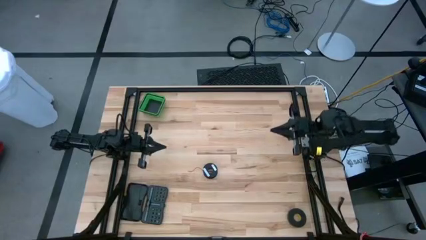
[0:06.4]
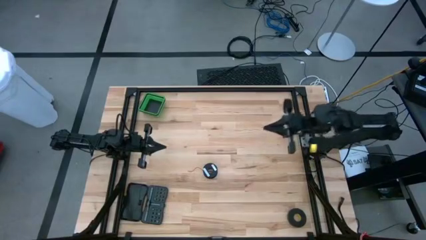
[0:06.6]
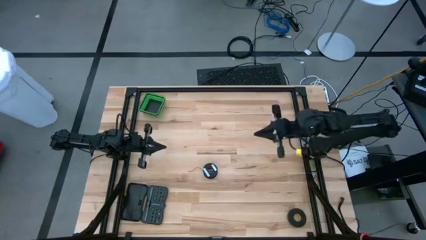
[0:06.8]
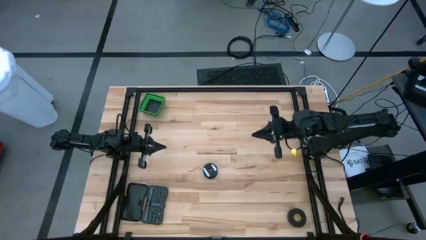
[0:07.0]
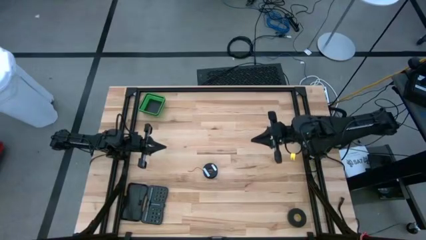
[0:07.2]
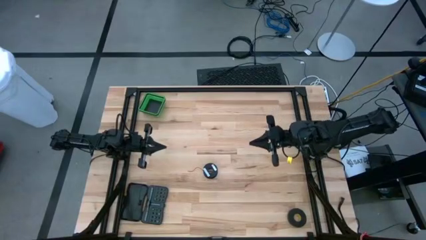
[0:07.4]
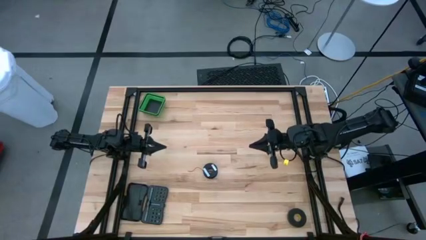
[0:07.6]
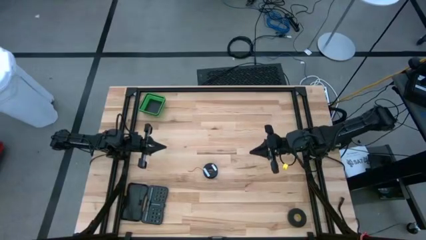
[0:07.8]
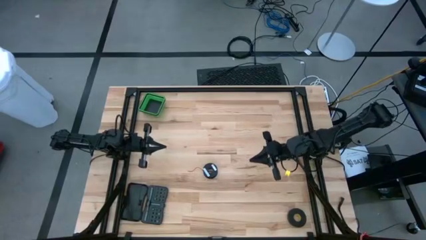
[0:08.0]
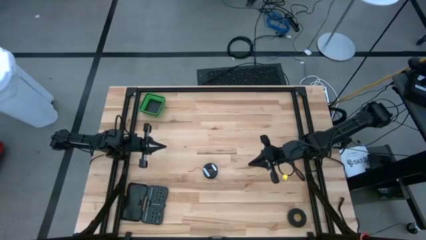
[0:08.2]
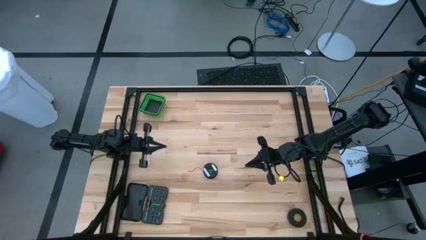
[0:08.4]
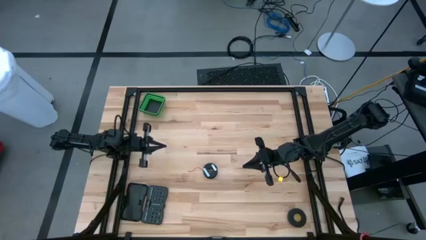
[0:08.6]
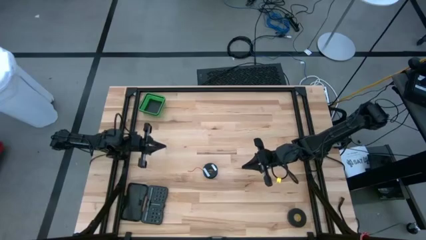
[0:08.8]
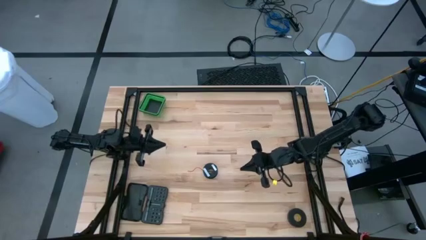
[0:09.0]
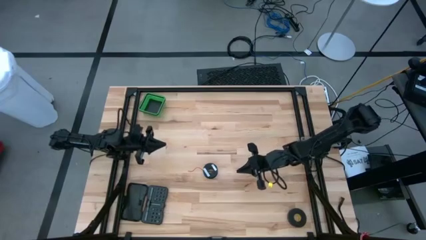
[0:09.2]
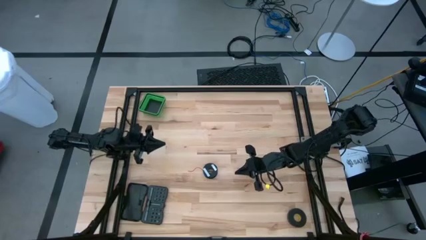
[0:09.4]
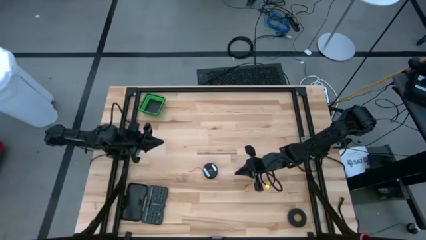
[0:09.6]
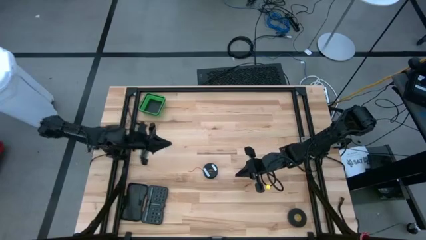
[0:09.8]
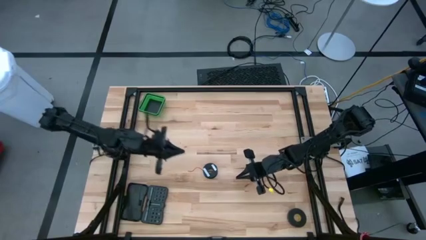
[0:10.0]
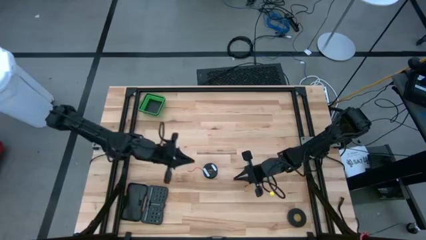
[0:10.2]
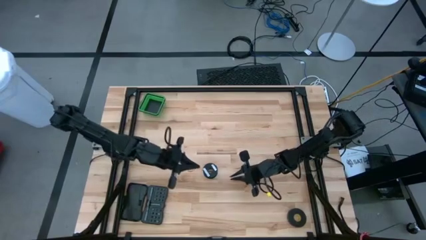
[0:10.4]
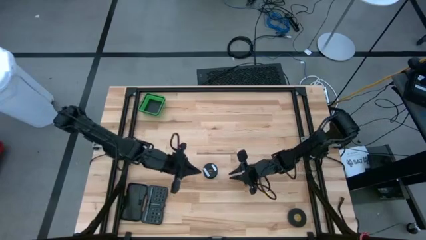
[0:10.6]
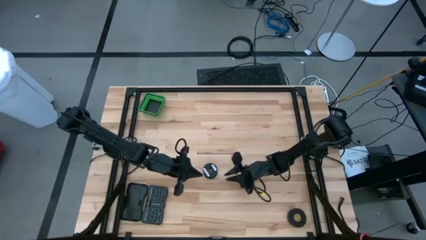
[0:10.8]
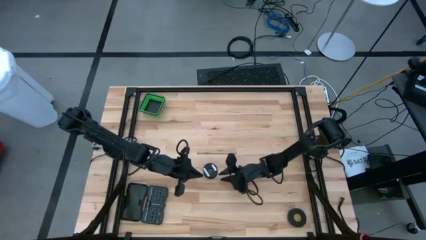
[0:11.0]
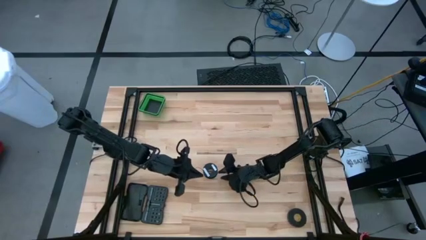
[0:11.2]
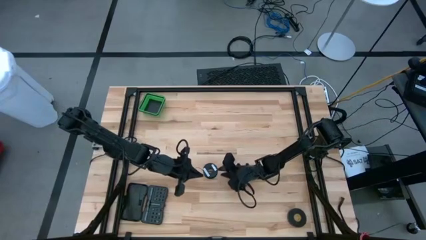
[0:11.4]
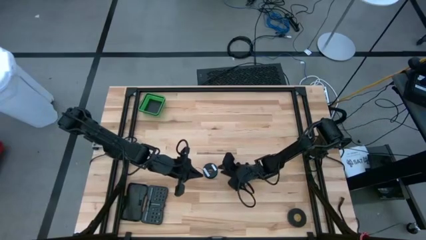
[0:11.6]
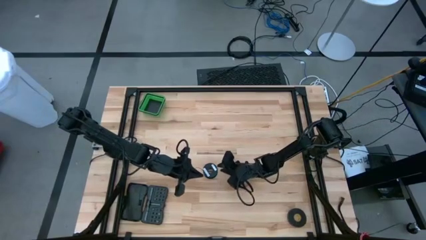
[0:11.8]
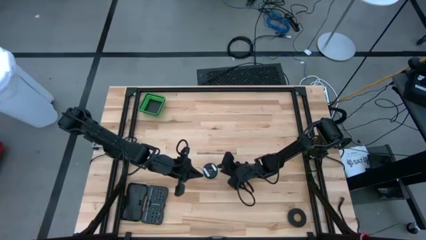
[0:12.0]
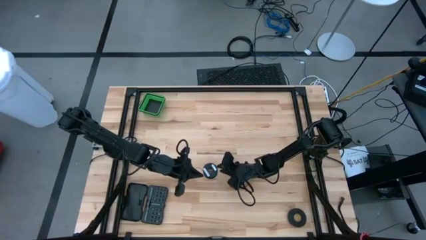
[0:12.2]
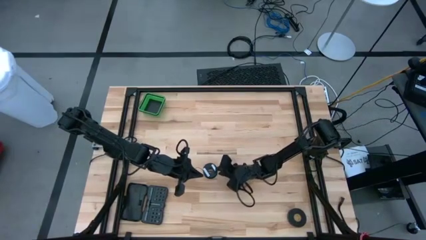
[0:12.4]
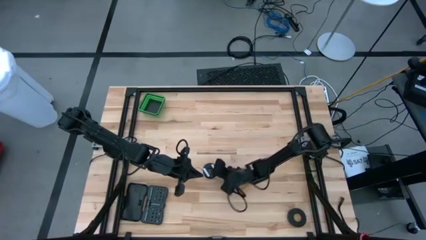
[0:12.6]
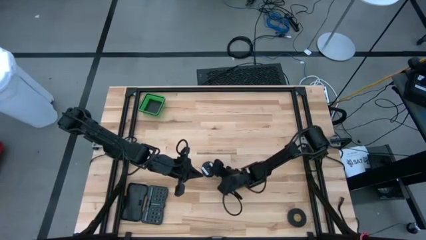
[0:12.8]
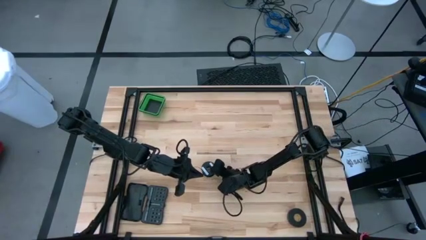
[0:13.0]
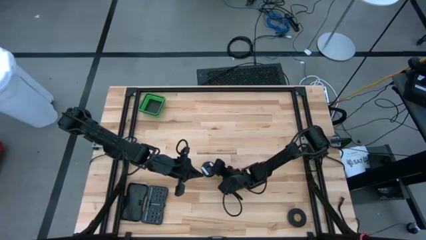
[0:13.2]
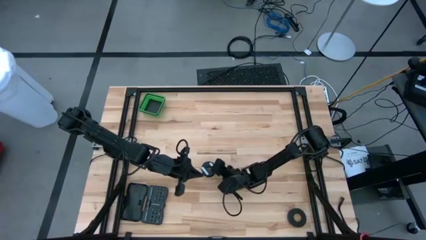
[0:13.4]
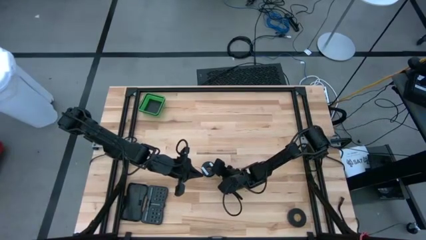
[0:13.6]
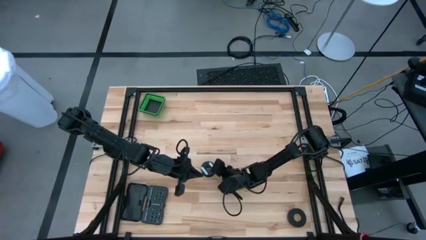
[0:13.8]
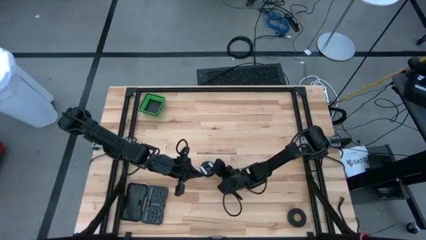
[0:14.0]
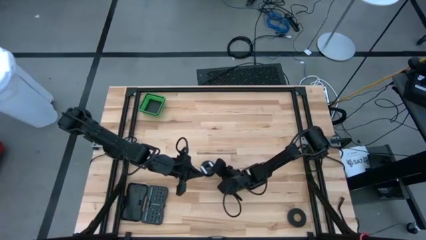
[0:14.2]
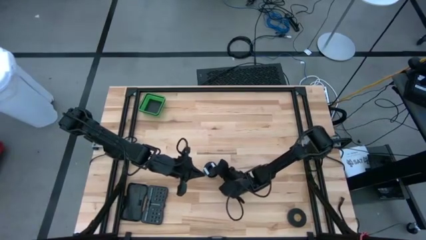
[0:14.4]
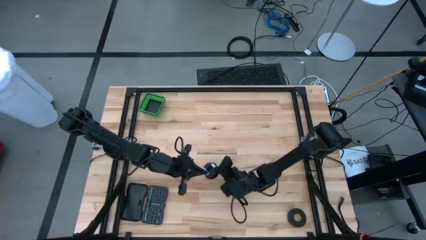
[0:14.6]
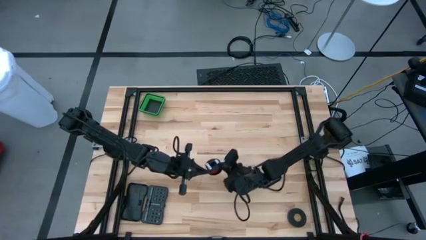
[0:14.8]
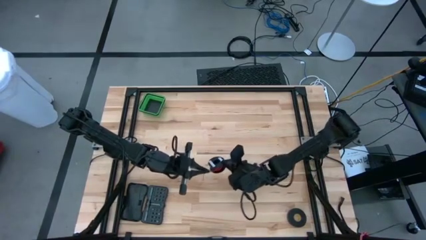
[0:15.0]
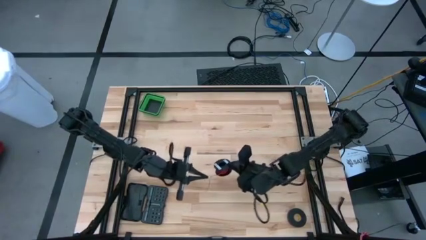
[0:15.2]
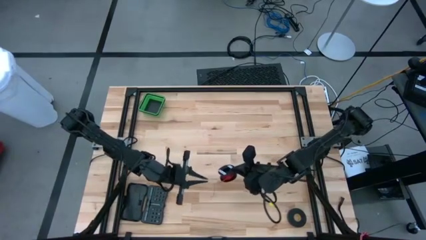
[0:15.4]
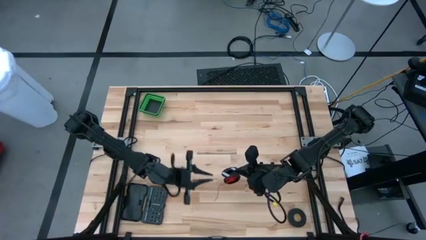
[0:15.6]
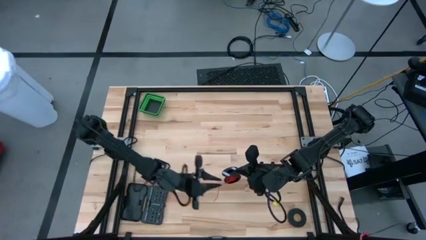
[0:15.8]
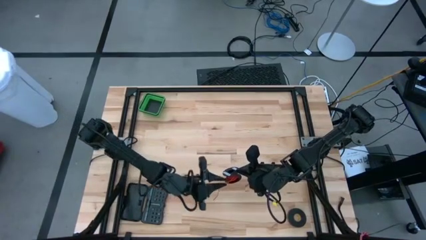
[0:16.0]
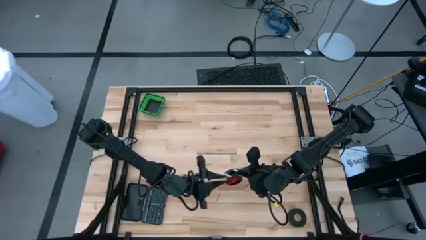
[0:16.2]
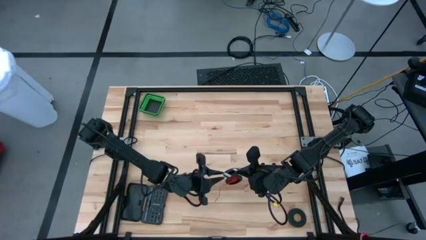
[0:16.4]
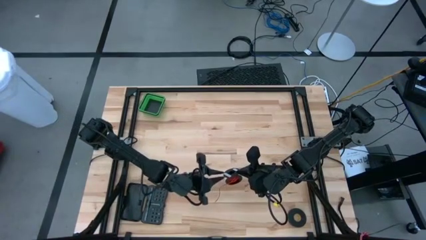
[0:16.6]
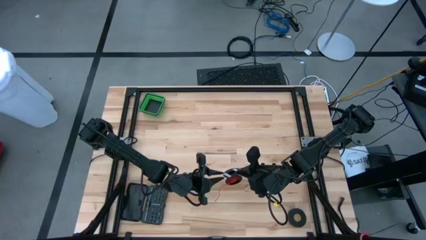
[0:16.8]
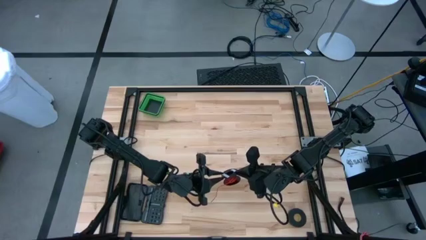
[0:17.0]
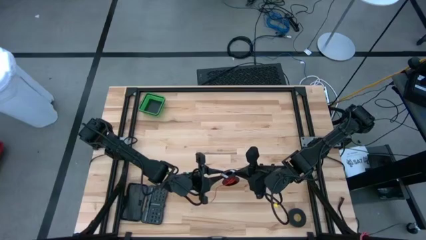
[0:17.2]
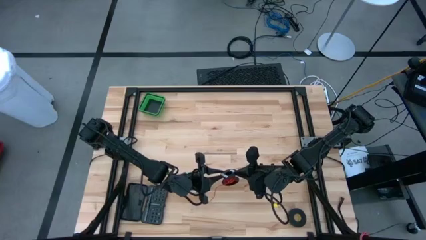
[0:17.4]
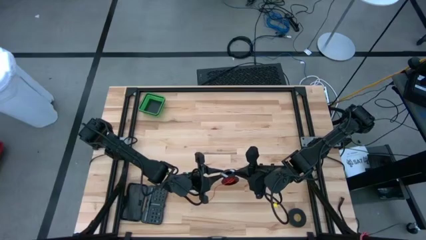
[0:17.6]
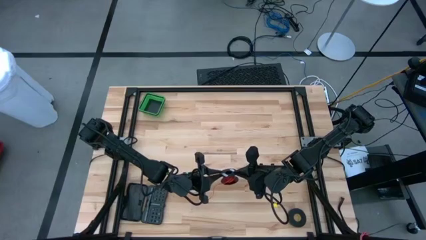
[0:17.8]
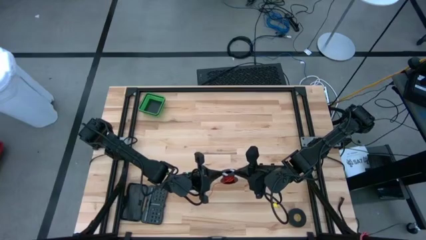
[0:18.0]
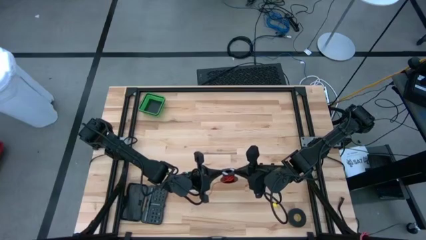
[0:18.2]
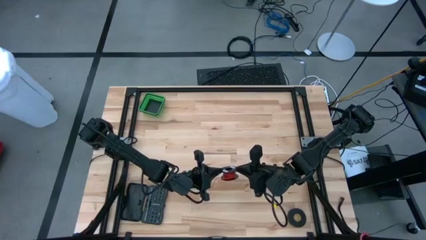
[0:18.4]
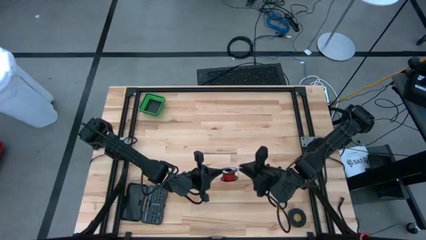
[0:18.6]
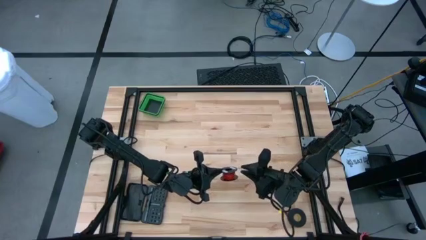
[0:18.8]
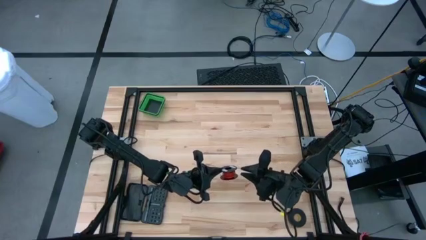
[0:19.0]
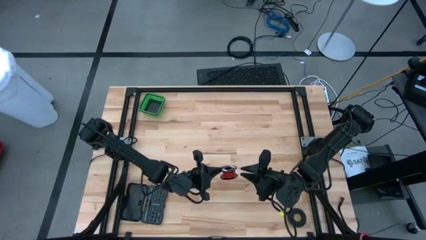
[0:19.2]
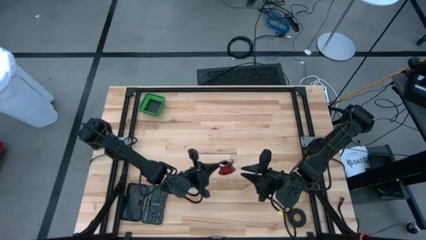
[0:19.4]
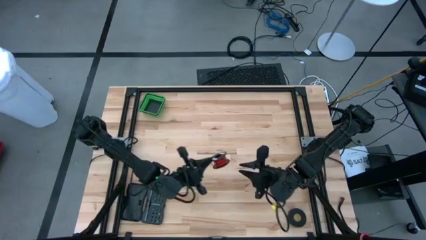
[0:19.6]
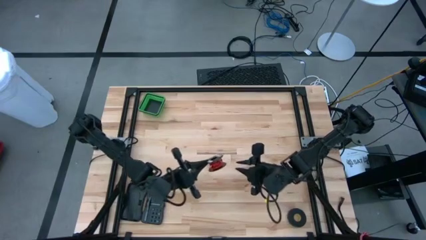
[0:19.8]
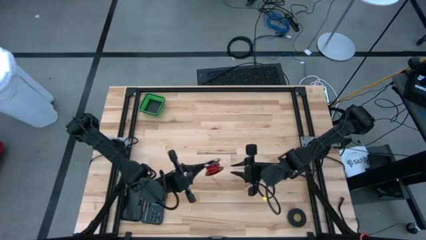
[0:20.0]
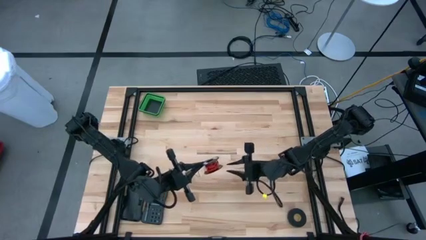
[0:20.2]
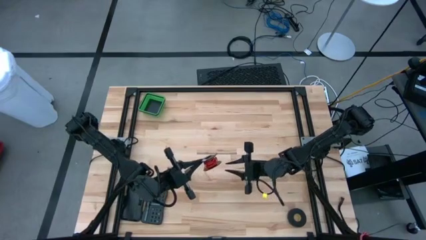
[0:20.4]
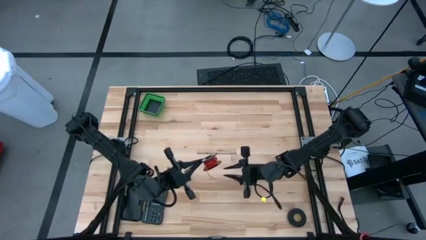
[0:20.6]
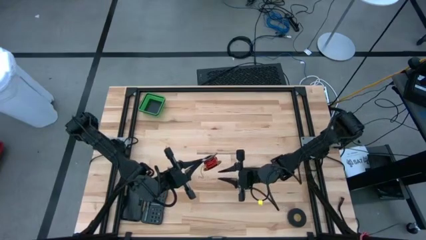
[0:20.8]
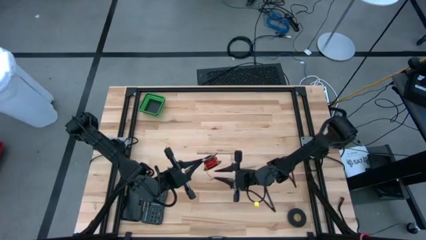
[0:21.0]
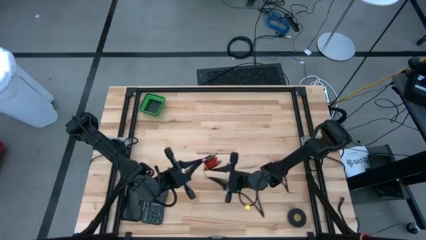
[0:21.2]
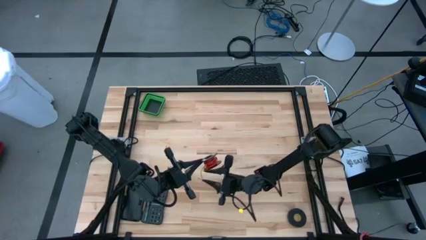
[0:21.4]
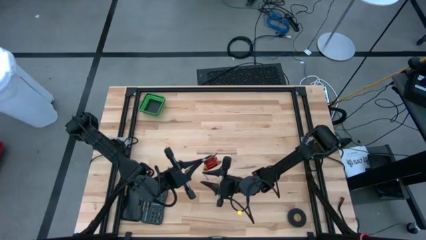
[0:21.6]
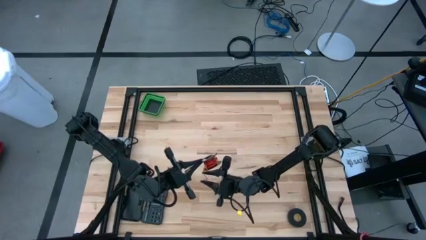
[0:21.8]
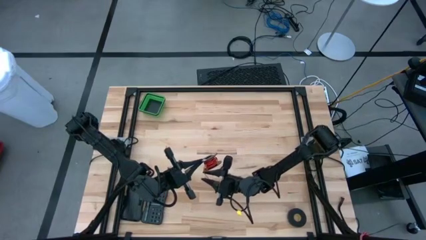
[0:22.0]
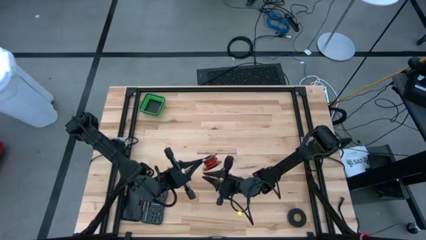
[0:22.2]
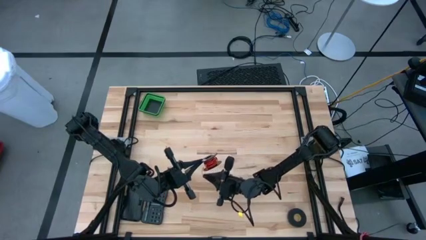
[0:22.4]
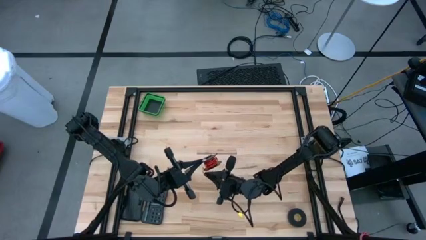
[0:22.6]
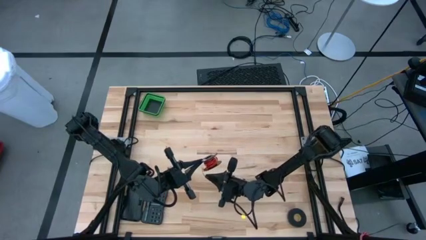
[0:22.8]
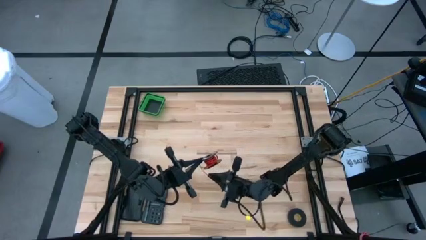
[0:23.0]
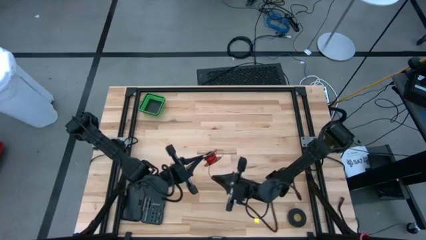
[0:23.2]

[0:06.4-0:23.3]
Task: Coil cords
Uncoil the red wire from the spool
